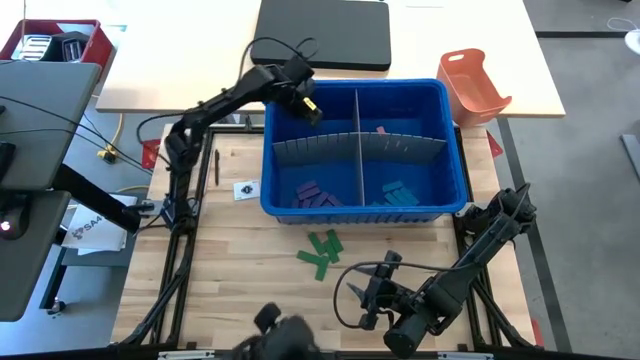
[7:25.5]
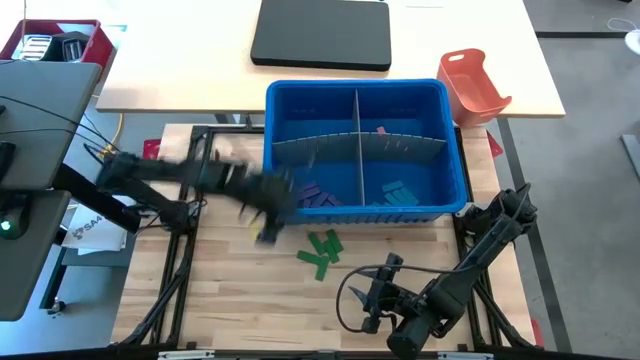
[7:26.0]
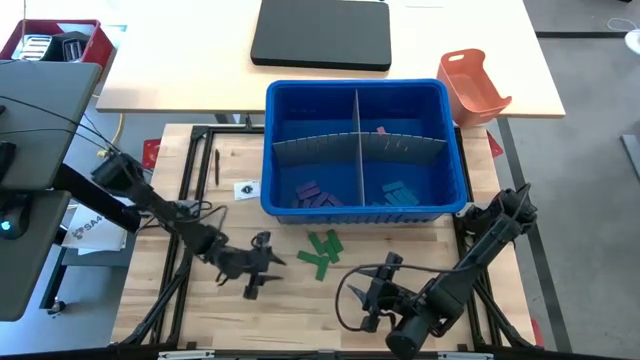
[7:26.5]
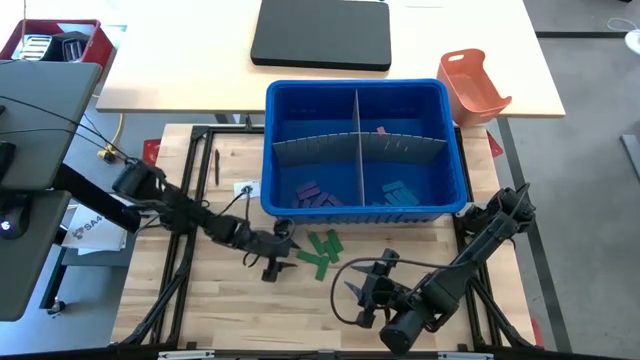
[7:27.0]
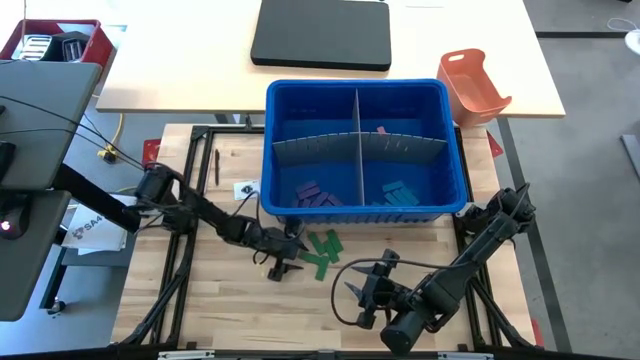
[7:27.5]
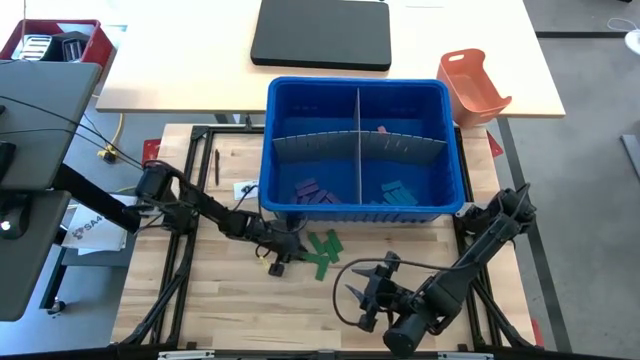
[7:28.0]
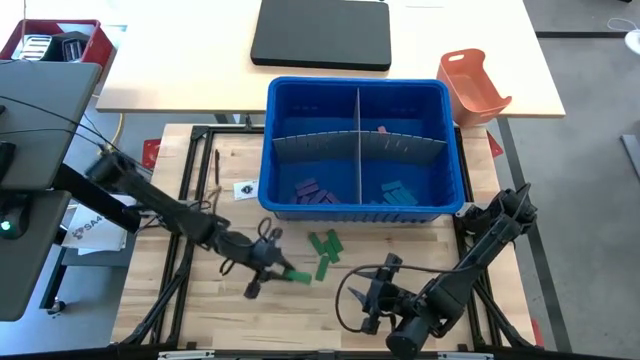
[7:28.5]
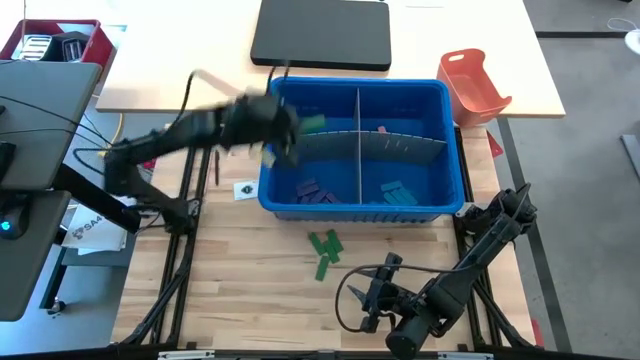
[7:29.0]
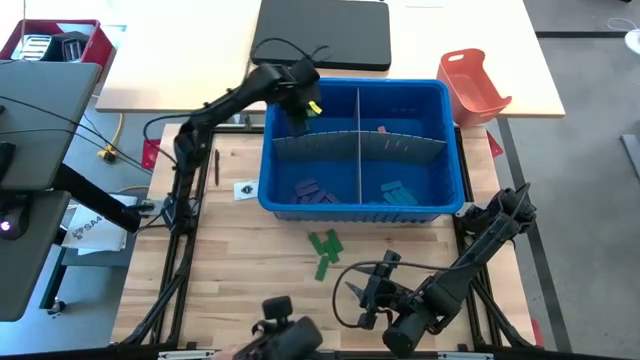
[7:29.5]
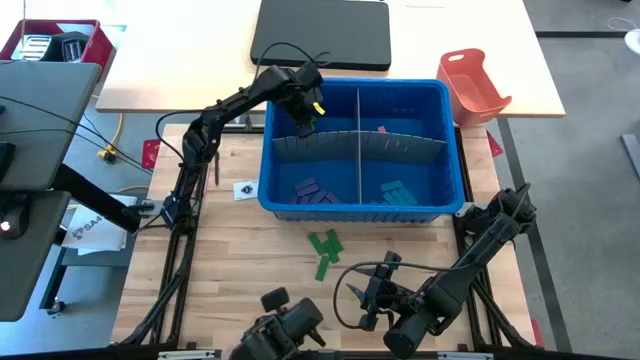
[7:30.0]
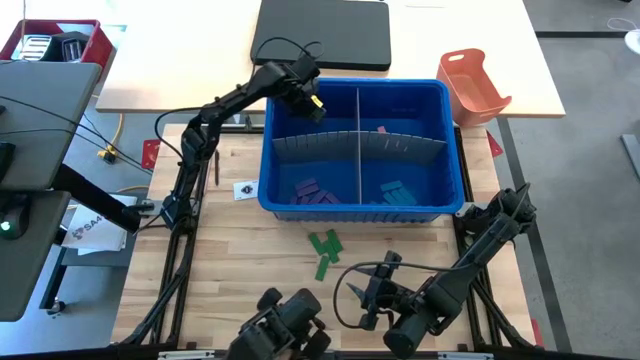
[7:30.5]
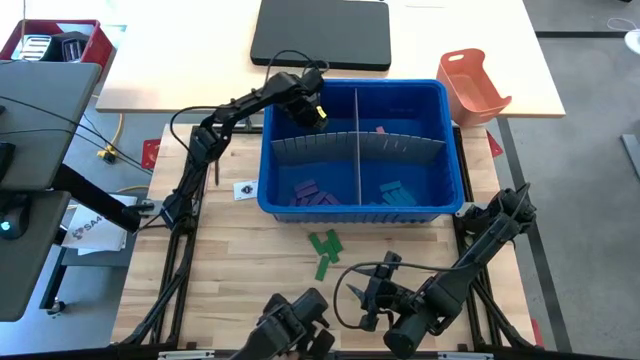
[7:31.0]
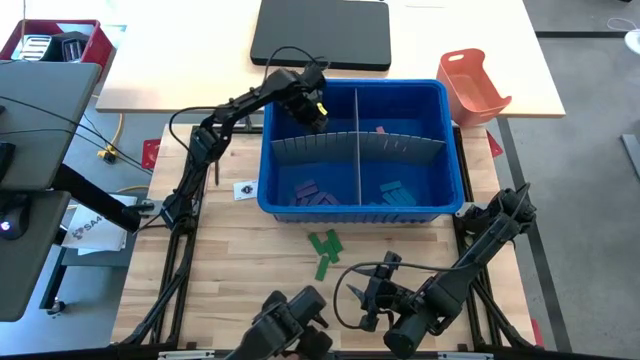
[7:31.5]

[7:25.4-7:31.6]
Task: Sort blocks
Put the green block into the blue bin with the other green block

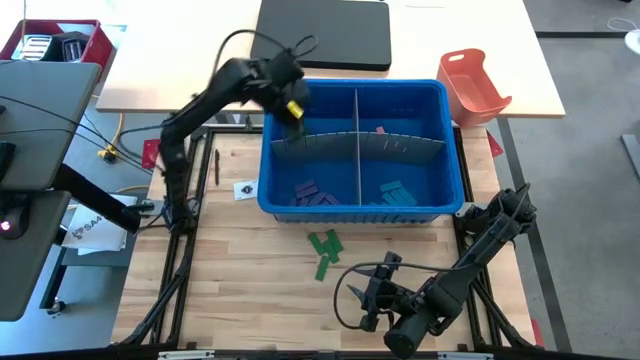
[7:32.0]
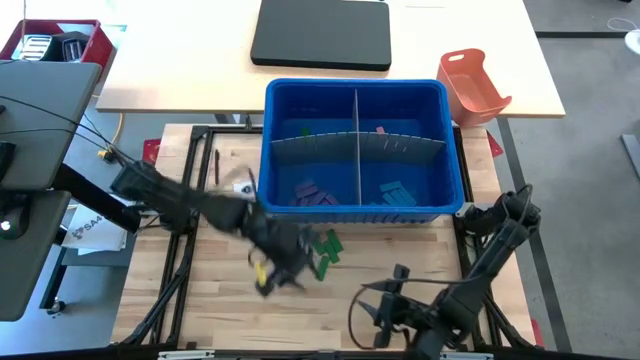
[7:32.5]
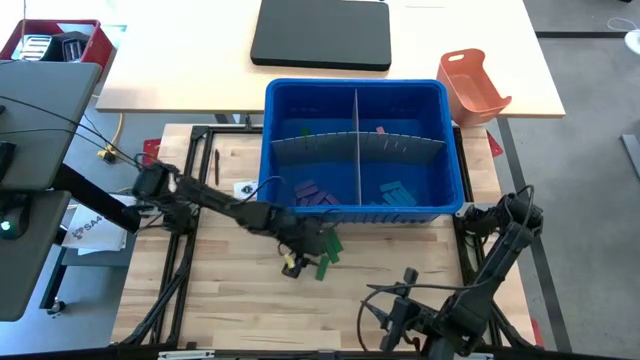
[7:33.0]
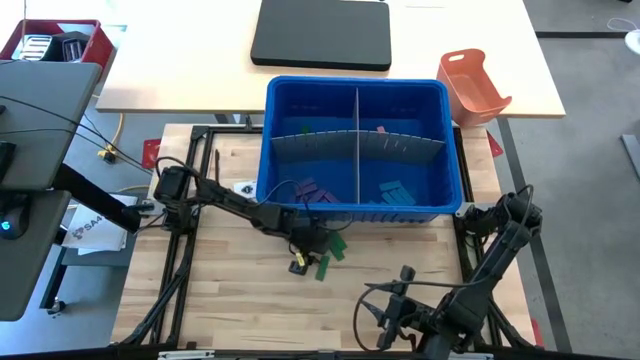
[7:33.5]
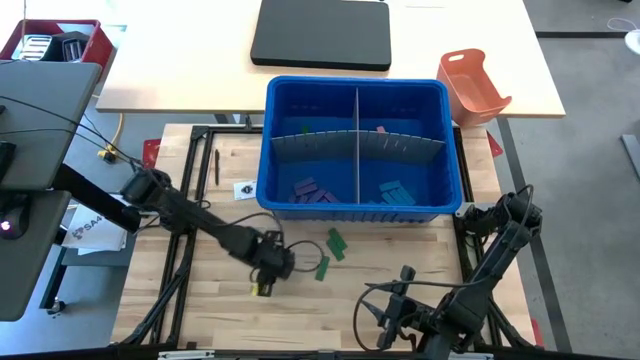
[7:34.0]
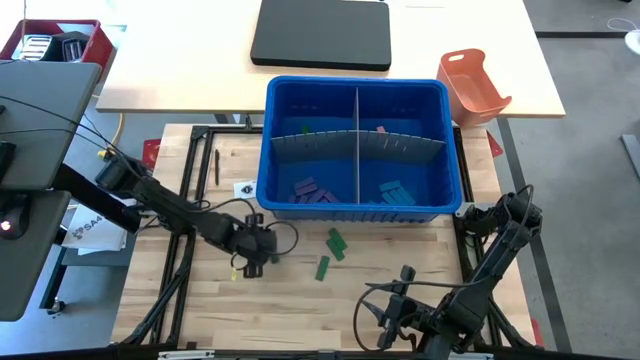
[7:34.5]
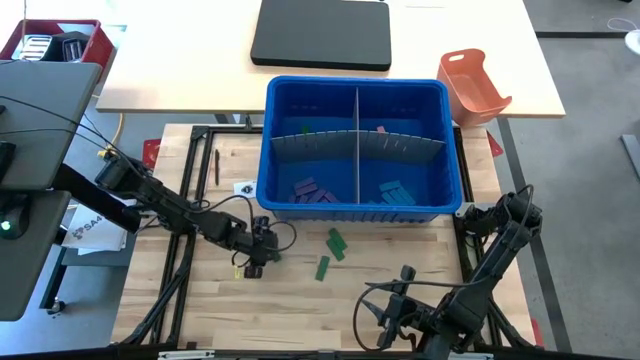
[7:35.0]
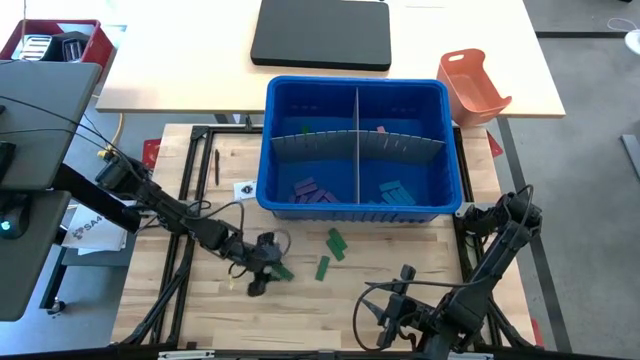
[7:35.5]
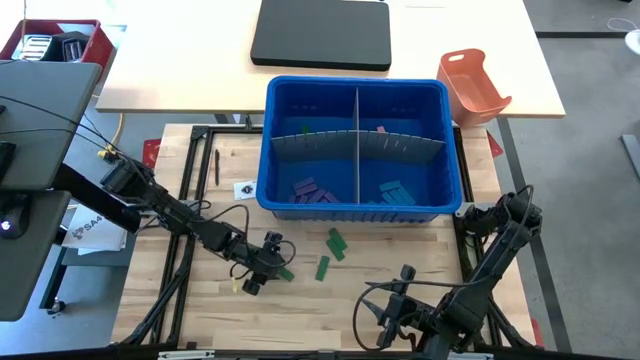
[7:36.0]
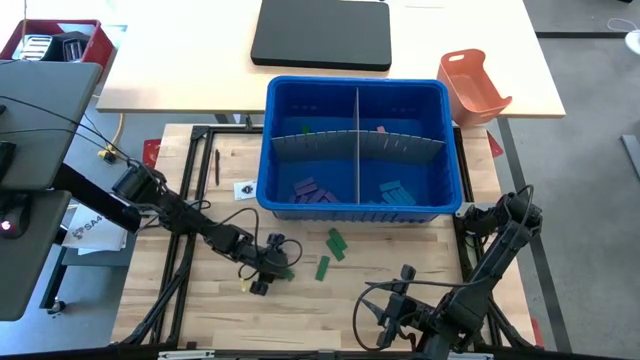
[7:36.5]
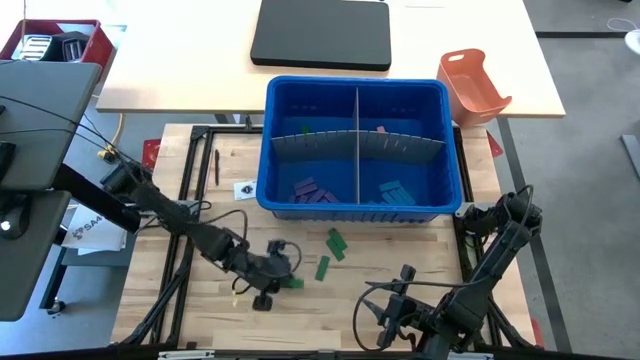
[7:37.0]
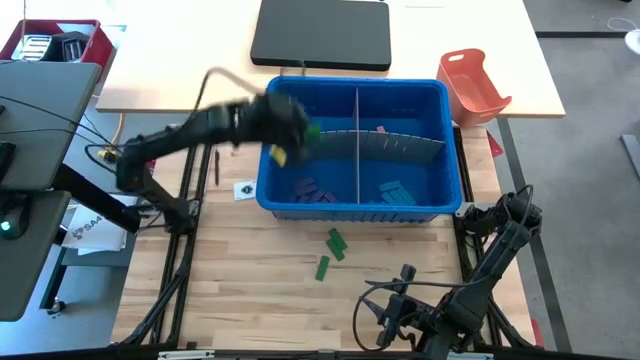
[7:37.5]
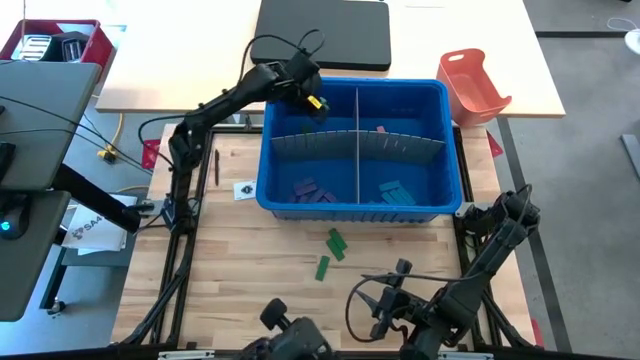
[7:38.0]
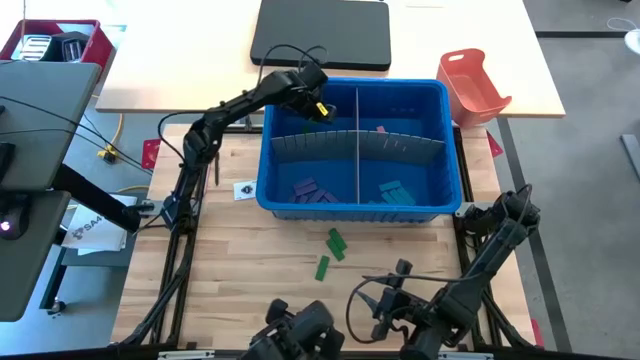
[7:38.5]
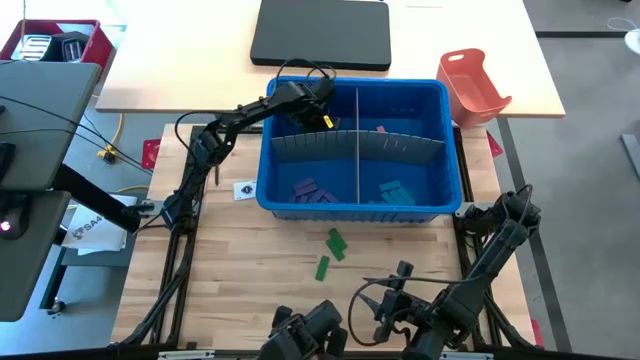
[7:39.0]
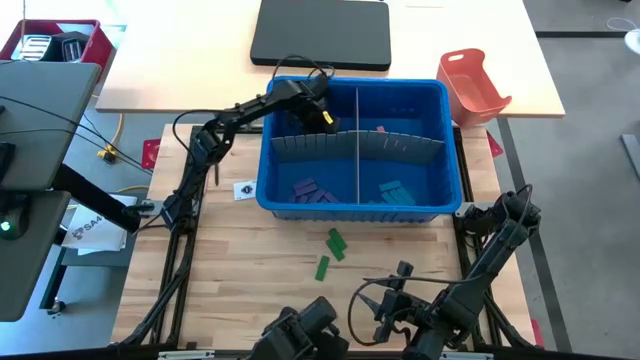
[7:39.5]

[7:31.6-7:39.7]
Put the green block into the blue bin with the other green block

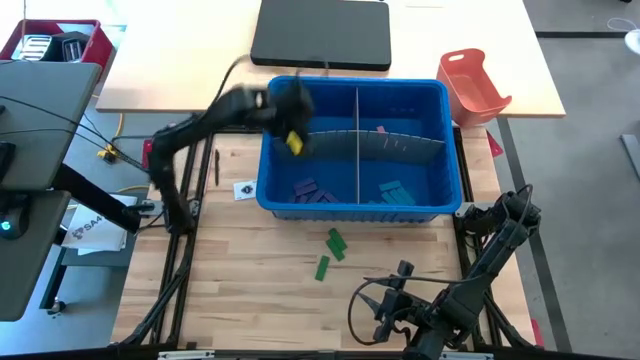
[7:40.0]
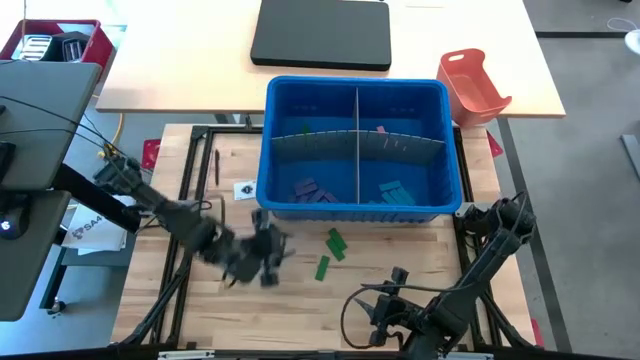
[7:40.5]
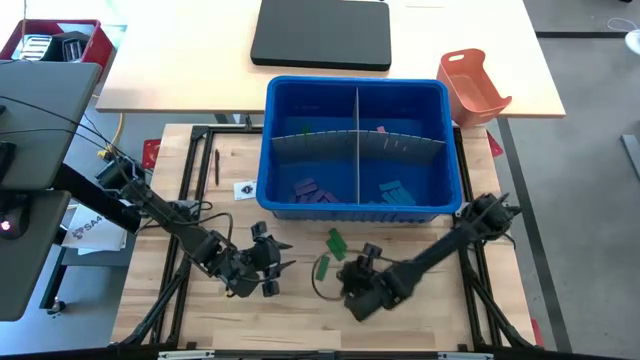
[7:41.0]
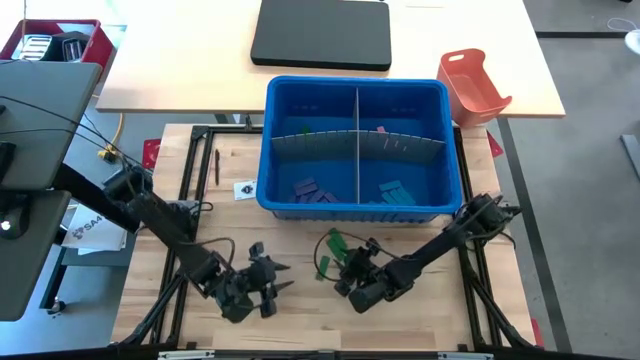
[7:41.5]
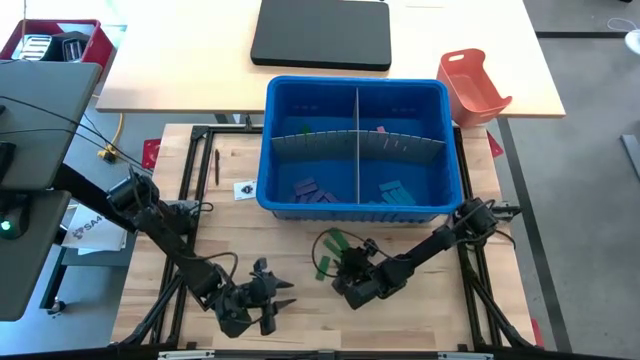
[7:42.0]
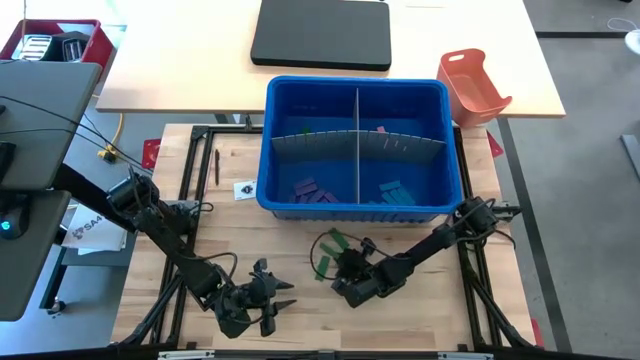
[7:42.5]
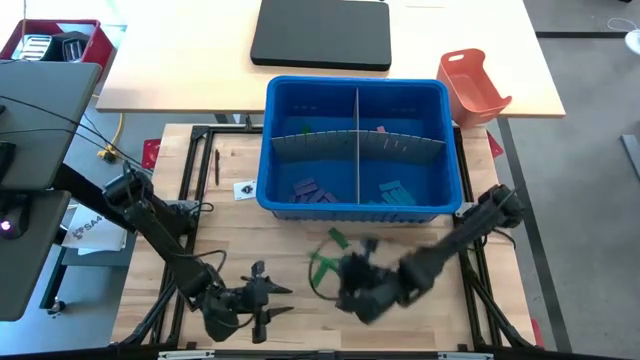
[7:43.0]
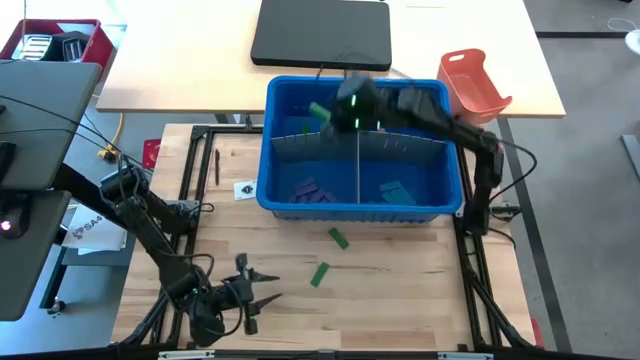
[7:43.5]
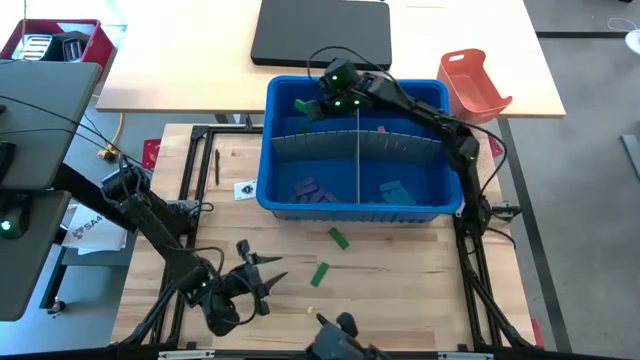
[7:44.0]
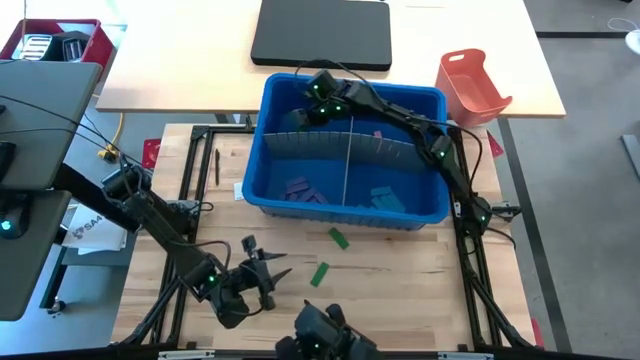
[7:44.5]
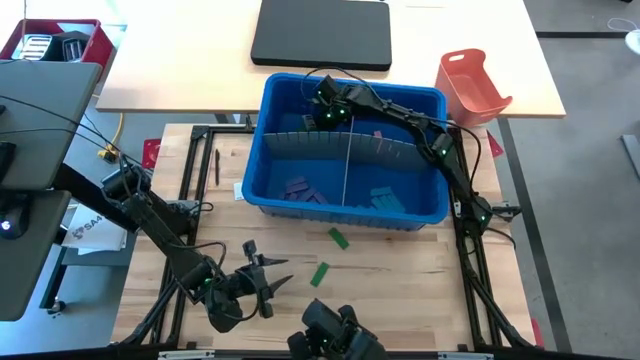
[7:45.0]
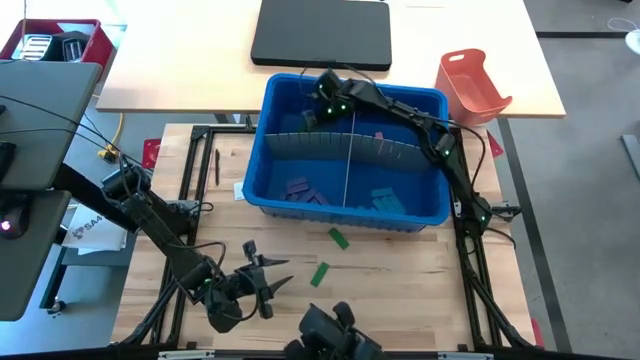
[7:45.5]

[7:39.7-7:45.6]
Put the green block into the blue bin with the other green block
